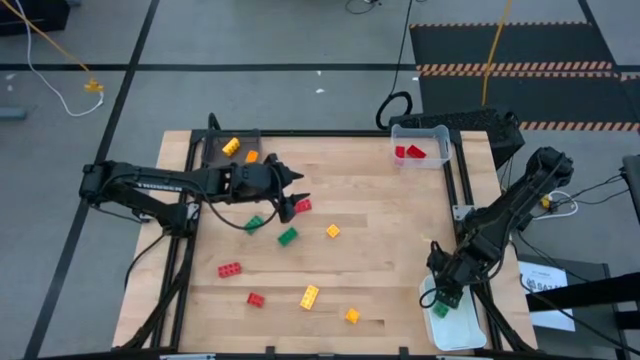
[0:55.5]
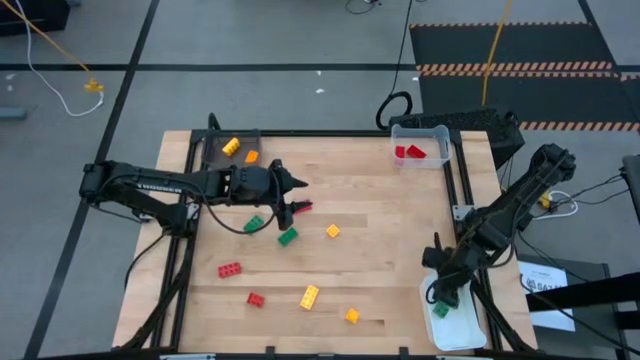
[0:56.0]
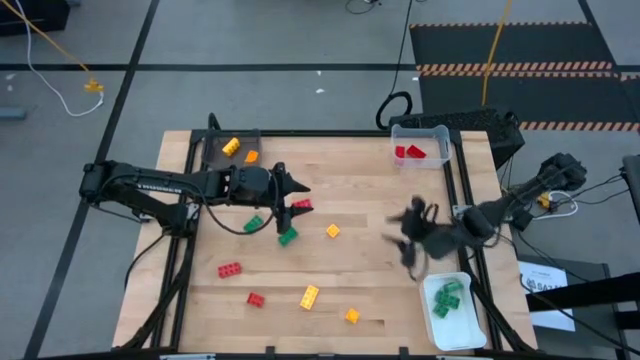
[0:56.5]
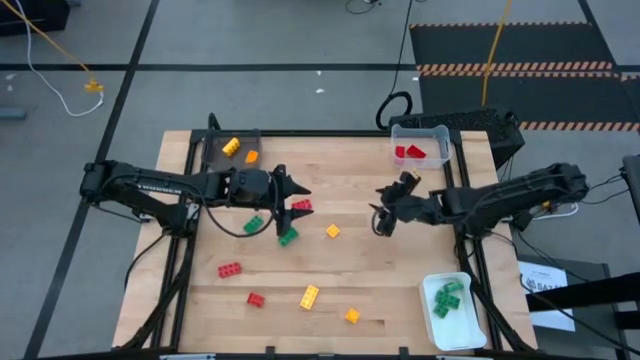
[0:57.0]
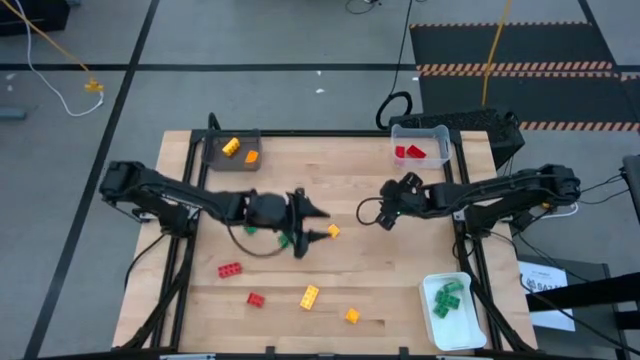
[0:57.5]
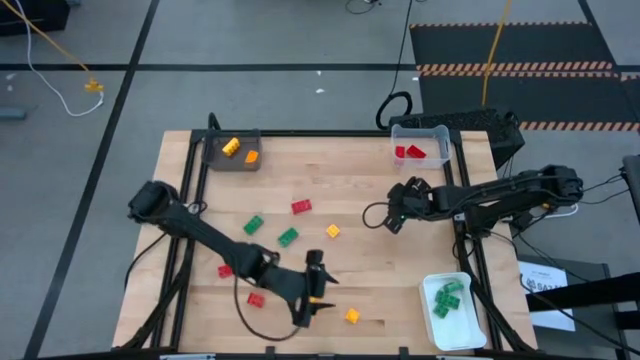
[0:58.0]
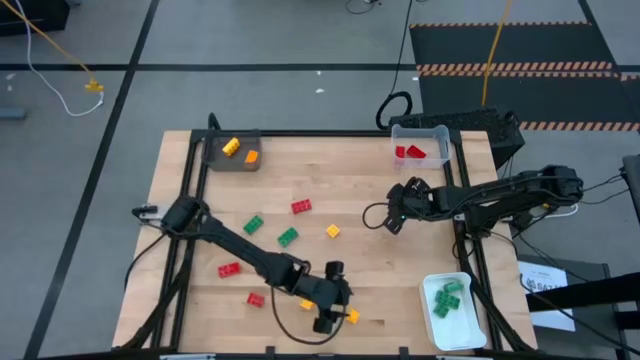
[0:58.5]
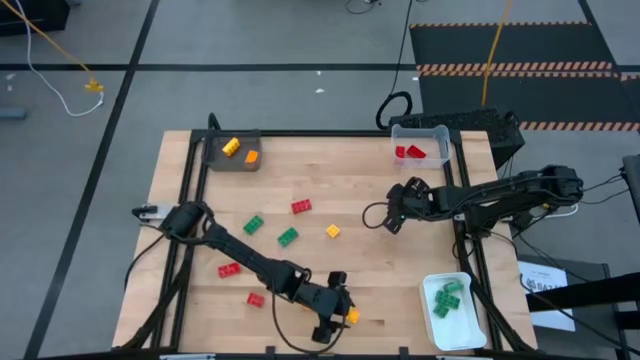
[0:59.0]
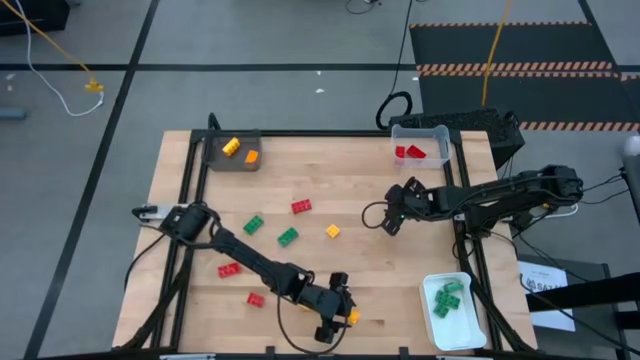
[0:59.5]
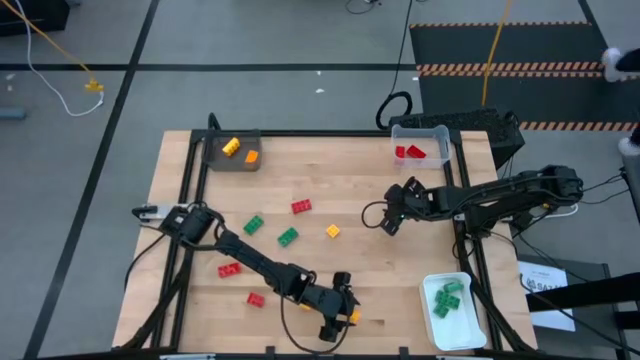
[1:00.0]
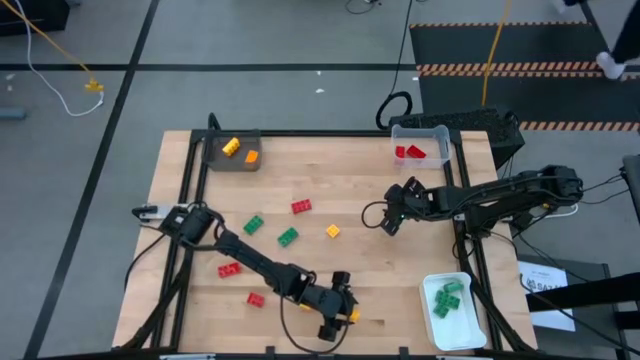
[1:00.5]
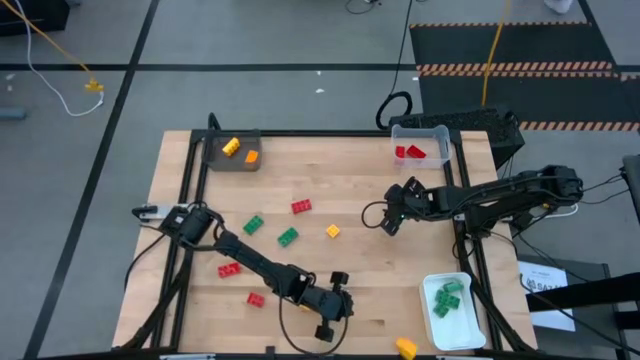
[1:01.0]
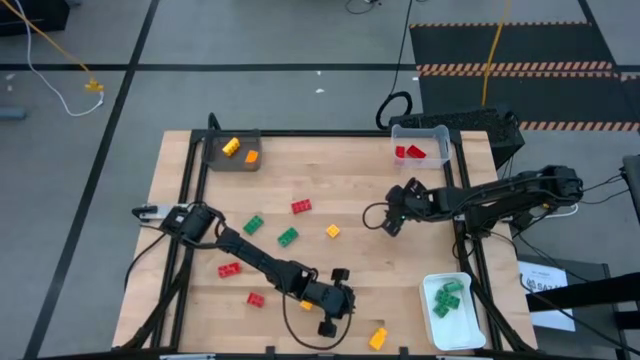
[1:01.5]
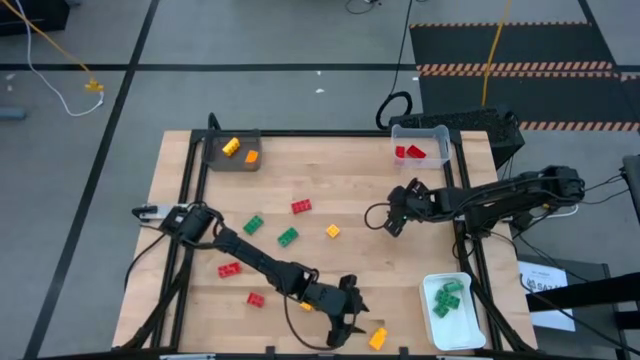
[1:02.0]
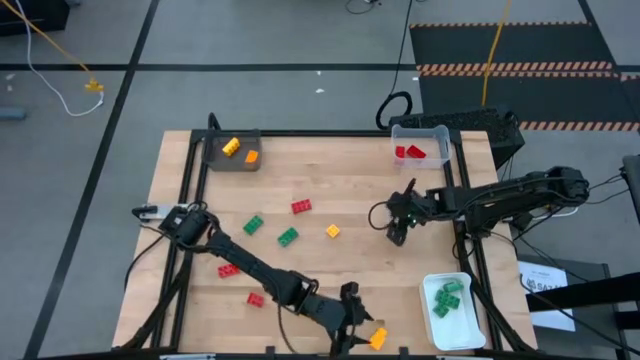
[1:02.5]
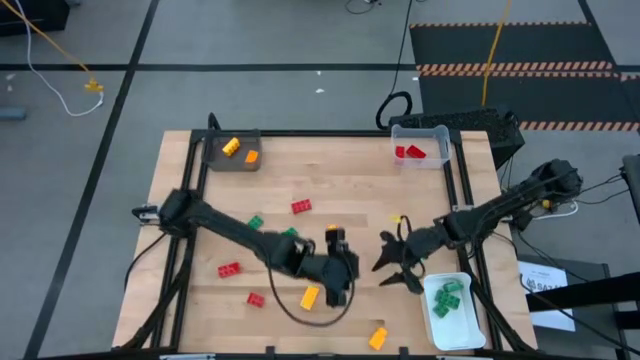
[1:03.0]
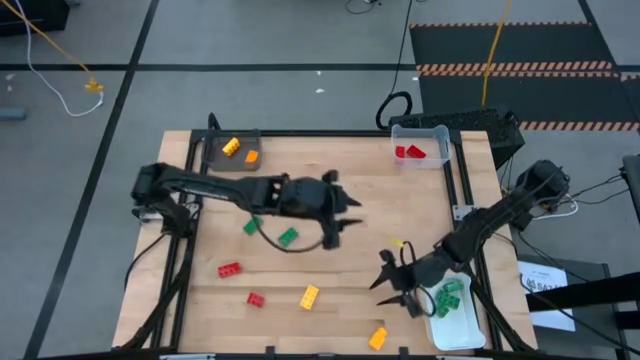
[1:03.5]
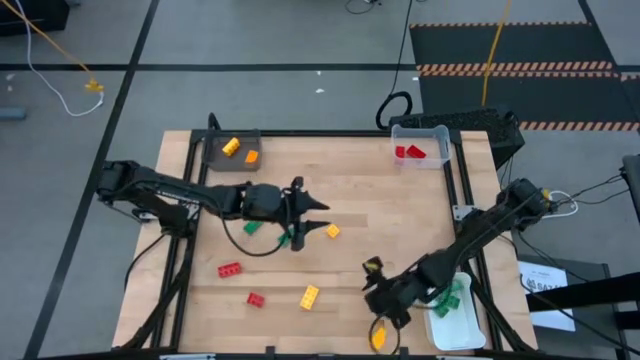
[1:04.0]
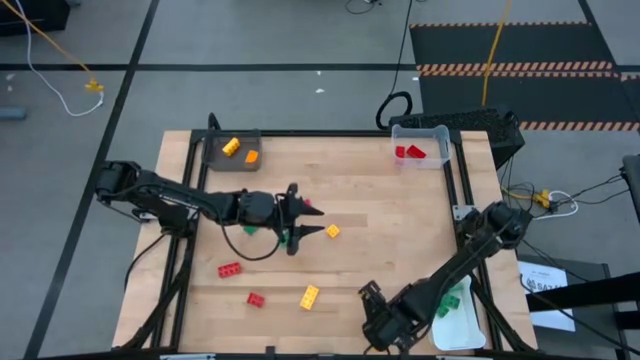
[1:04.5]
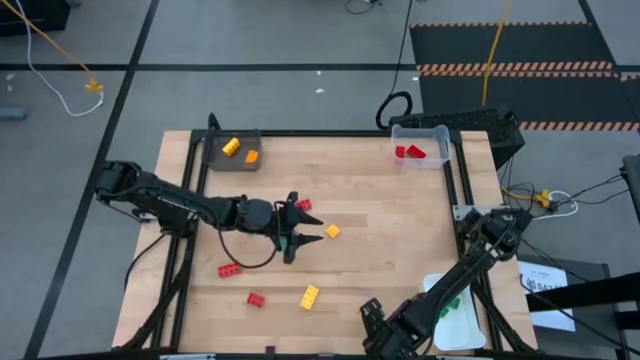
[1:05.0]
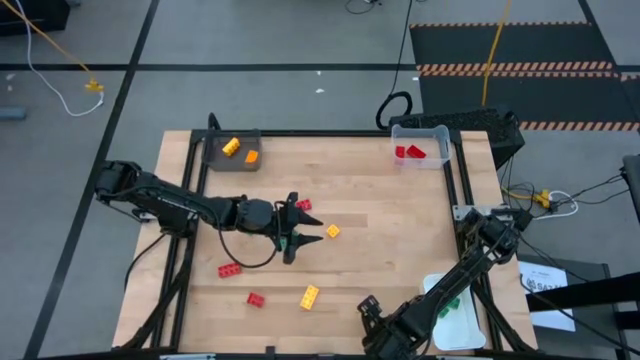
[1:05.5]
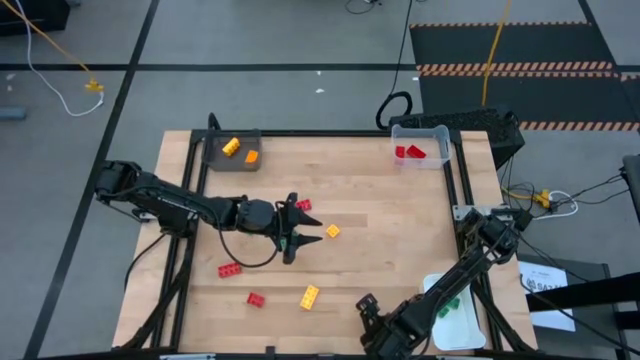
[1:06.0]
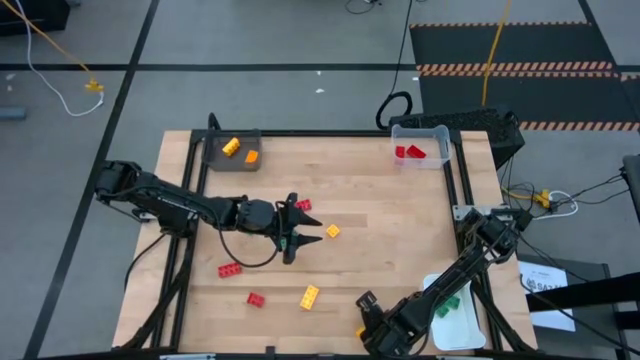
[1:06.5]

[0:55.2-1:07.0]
Task: Sort & place blocks by color
Put the yellow gamepiece into the black bin

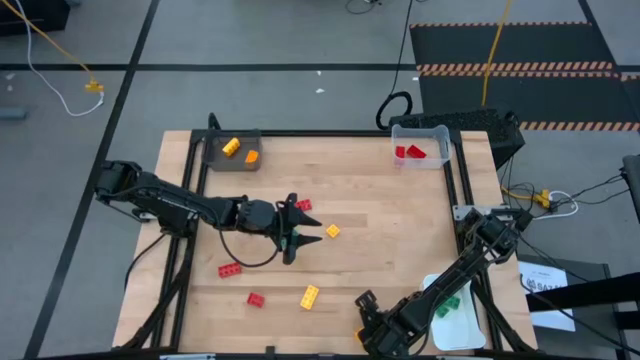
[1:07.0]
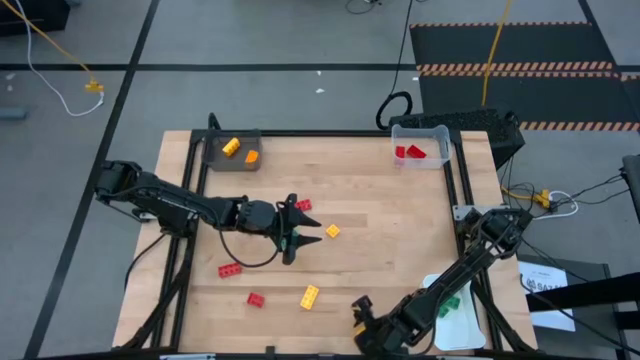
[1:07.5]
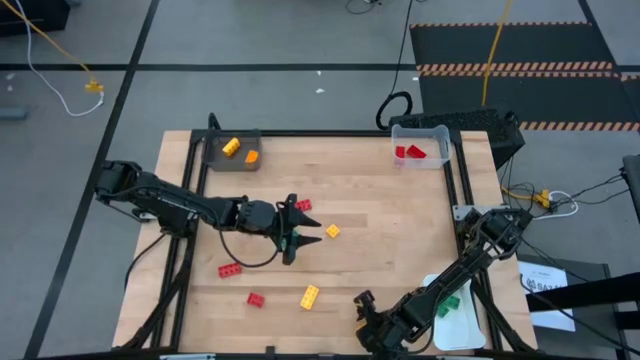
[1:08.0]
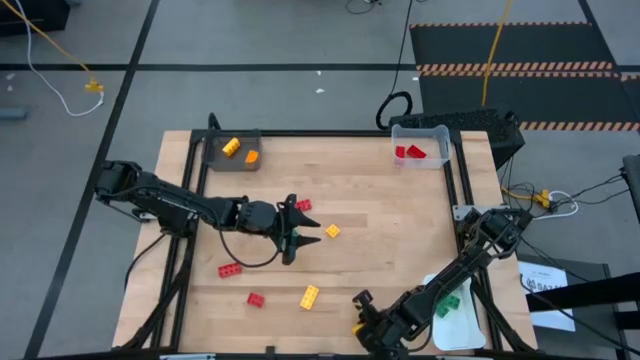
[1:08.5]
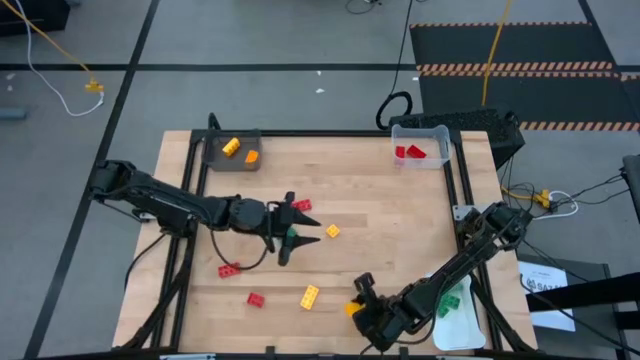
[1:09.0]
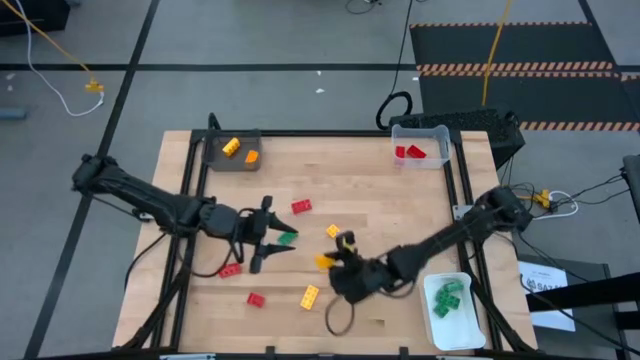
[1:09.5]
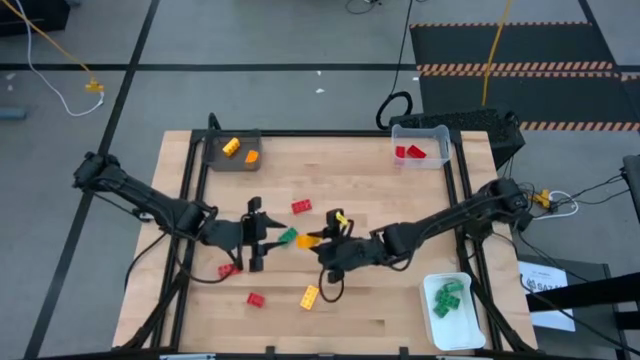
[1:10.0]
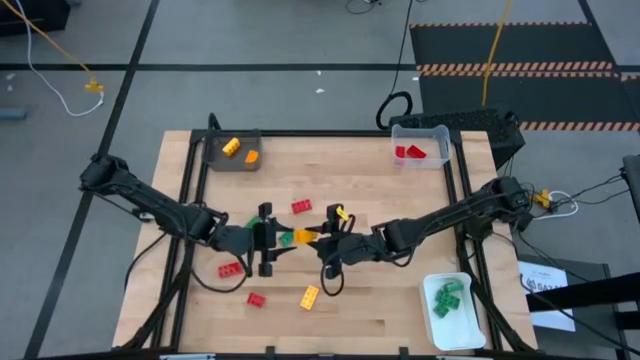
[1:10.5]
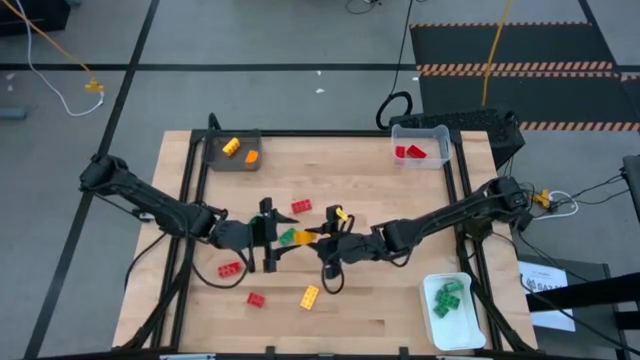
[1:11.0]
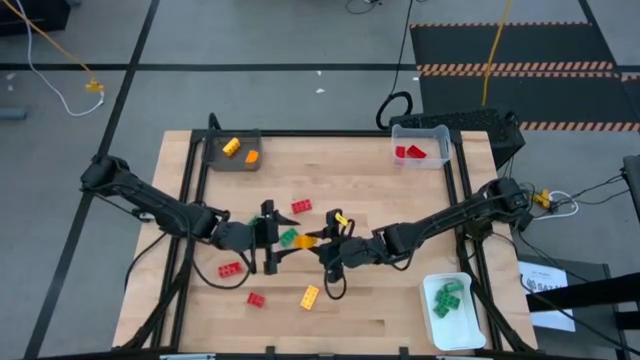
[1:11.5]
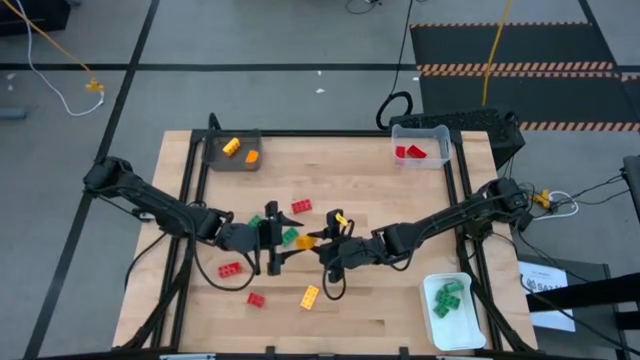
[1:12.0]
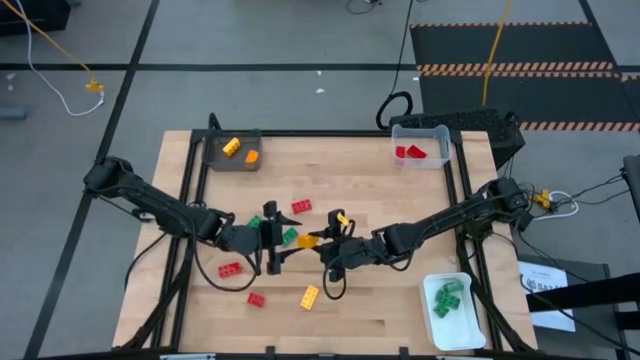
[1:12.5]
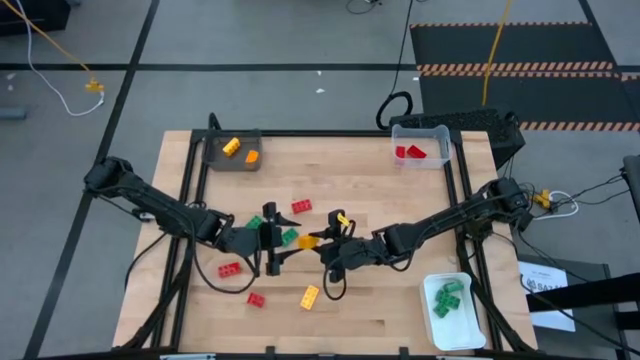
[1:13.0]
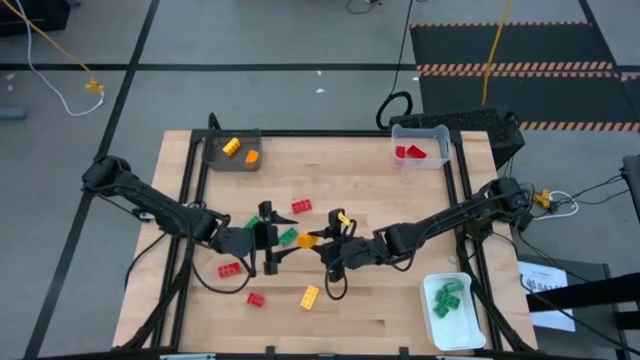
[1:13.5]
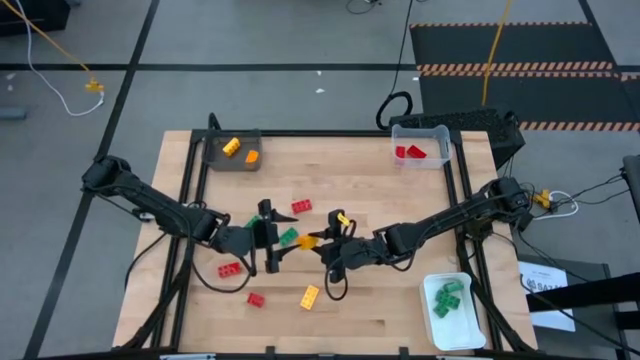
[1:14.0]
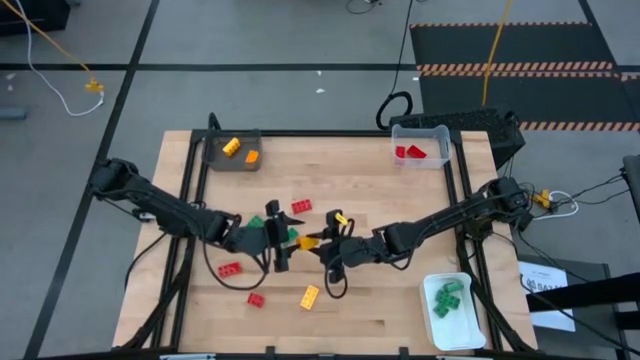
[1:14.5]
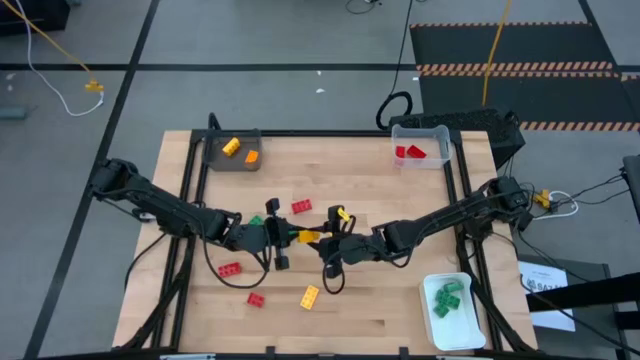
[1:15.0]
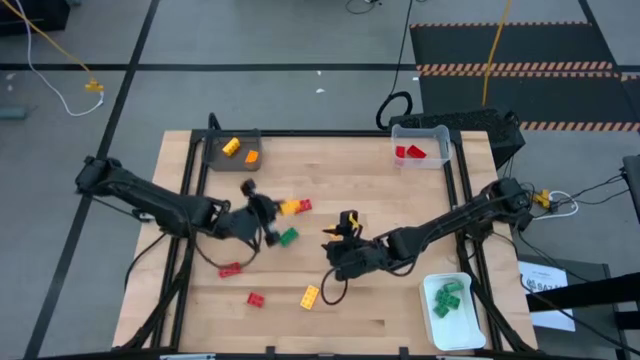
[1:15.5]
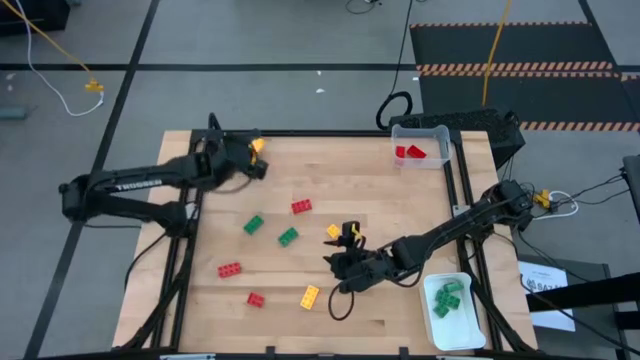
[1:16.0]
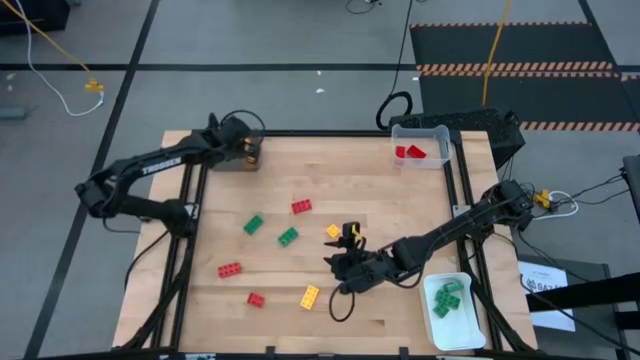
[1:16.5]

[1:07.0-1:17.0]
Put the yellow gamepiece into the black bin
